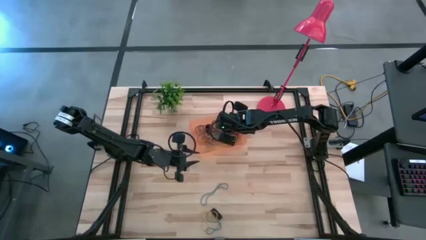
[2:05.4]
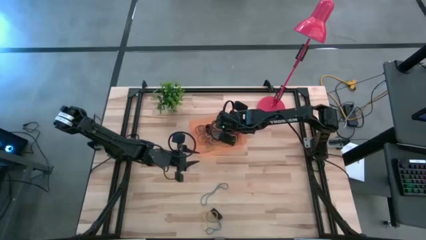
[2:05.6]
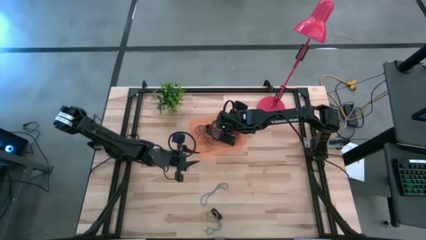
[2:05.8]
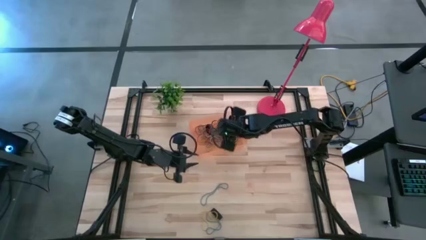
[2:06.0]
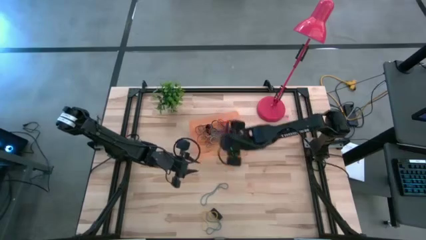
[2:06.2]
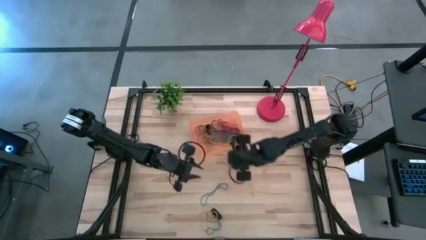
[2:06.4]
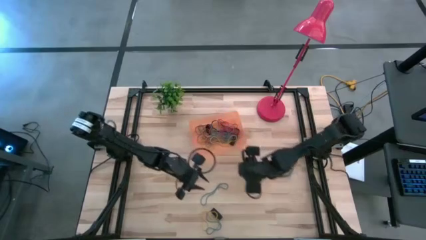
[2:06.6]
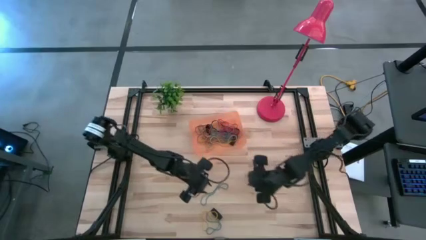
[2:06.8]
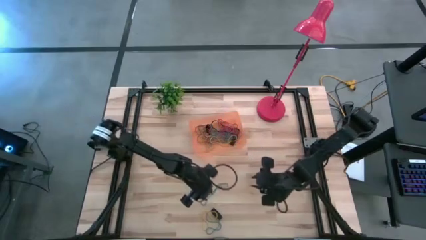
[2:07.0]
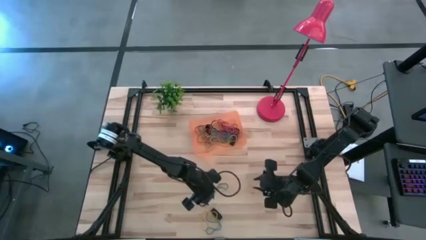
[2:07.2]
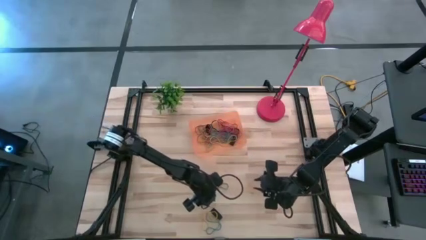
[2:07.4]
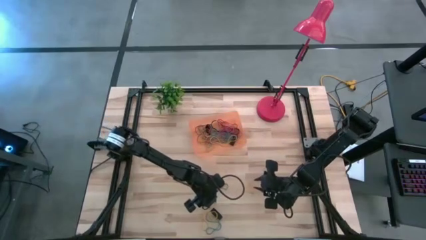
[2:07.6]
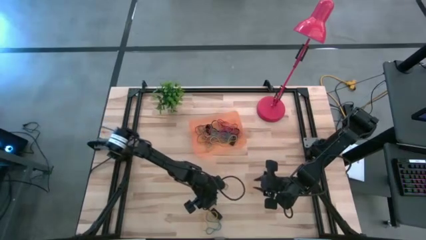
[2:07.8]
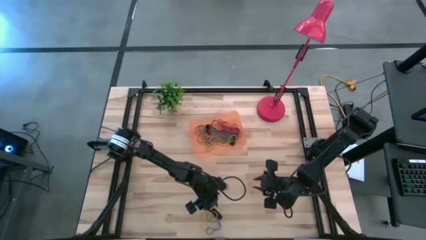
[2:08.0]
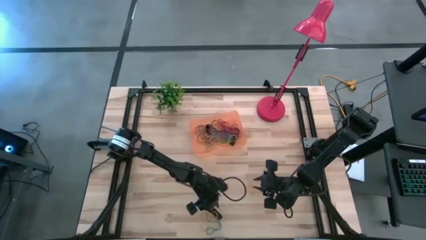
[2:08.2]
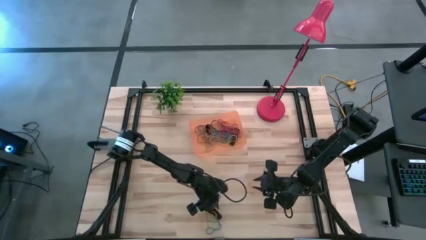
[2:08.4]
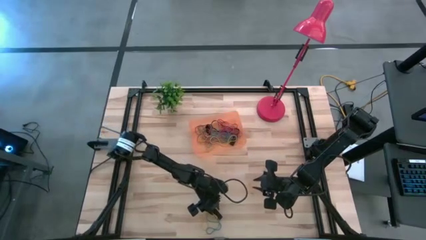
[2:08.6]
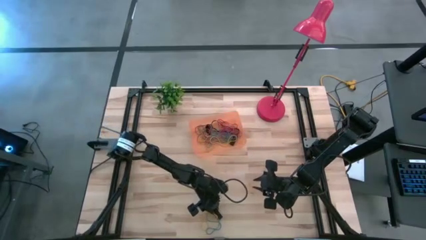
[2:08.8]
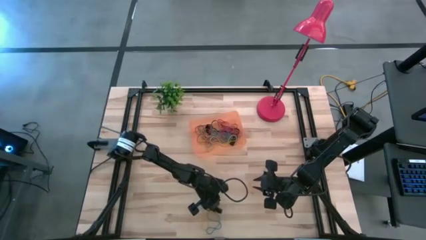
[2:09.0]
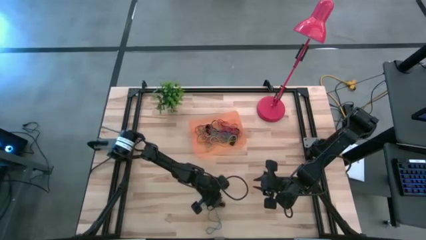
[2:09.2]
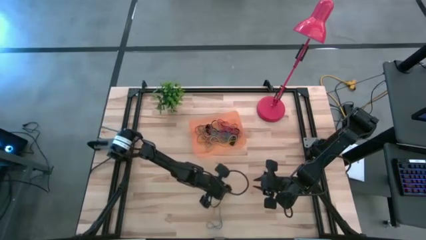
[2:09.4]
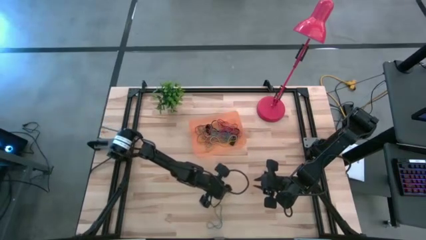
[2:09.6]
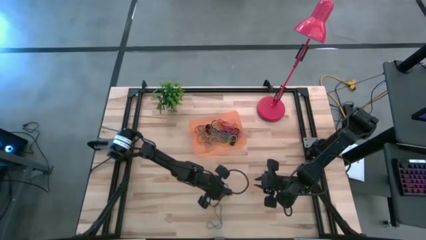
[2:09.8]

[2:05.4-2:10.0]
Task: Pick and place rubber bands into bin
Put the black rubber band into the orange bin

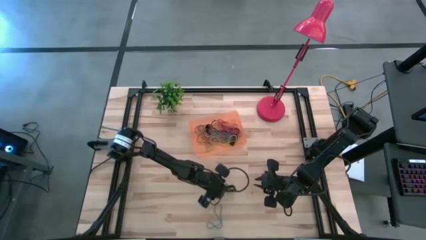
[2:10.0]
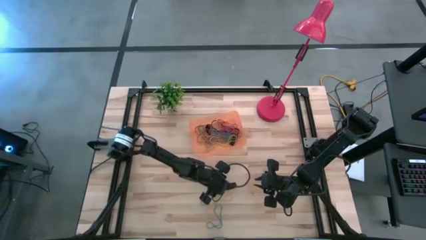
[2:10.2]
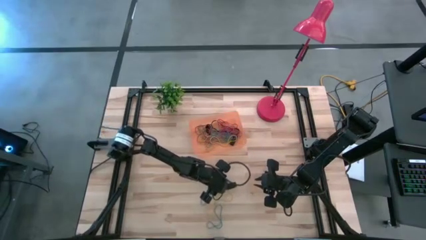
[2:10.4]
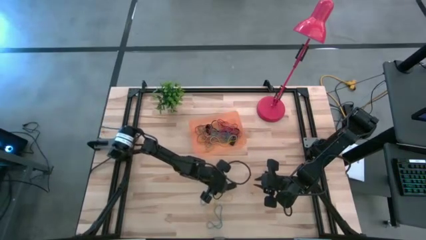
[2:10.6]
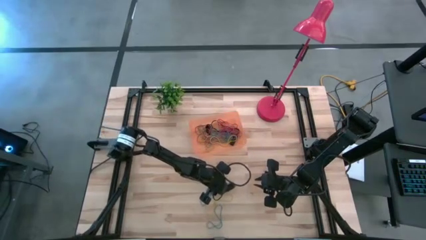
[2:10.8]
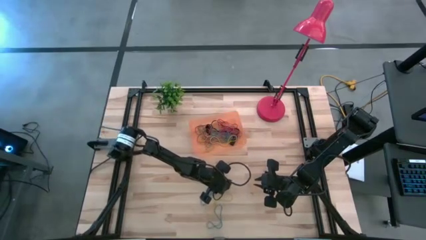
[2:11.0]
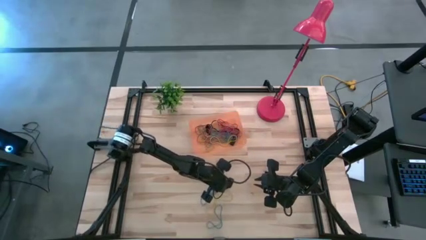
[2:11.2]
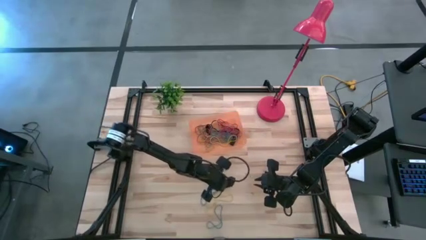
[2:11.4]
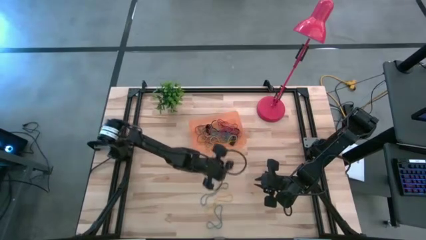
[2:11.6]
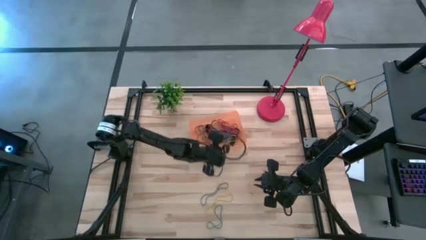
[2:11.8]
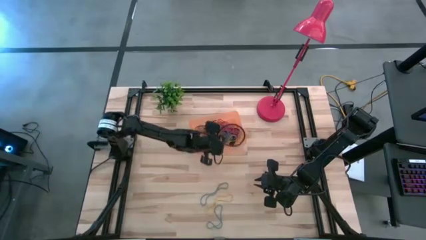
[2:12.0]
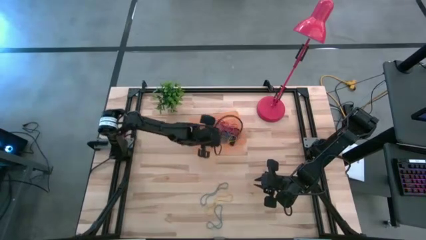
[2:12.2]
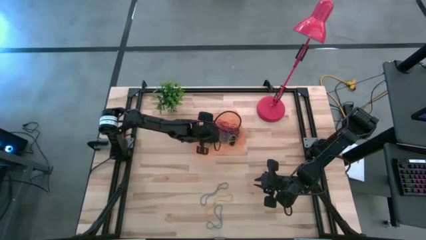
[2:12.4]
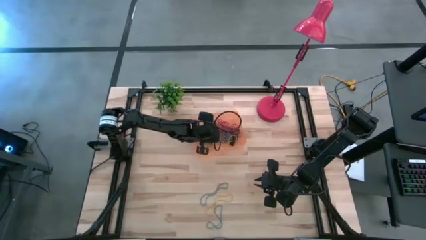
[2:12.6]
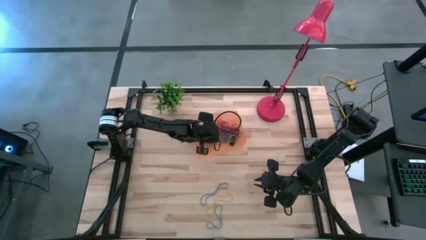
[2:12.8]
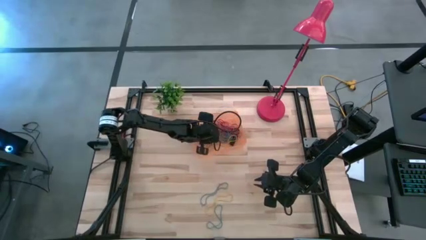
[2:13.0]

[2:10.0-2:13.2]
Put the black rubber band into the orange bin

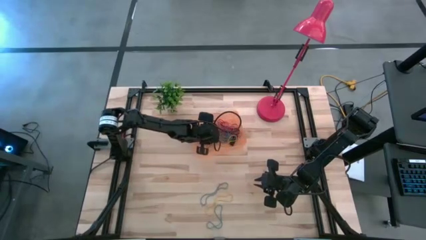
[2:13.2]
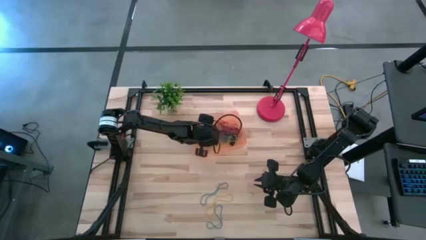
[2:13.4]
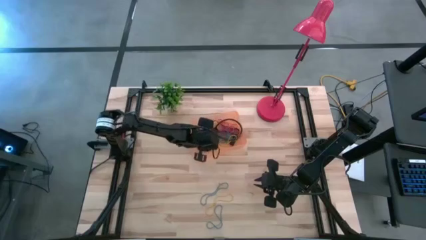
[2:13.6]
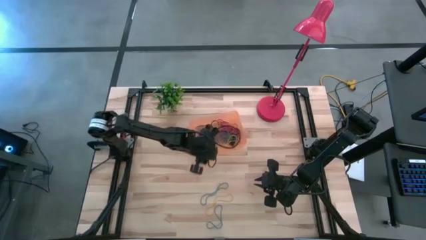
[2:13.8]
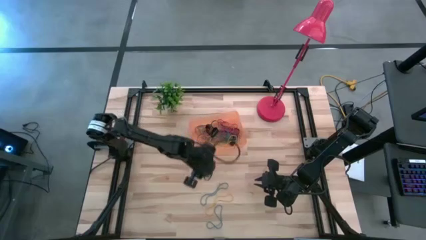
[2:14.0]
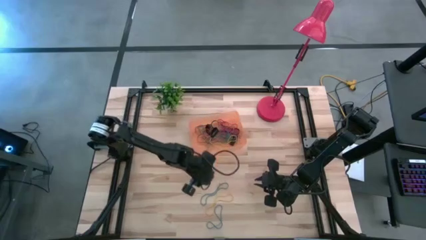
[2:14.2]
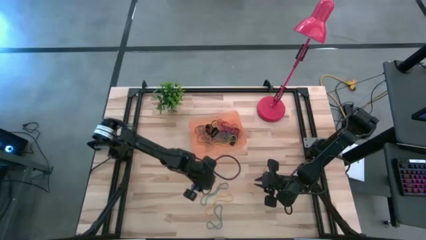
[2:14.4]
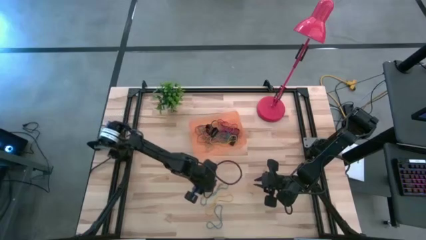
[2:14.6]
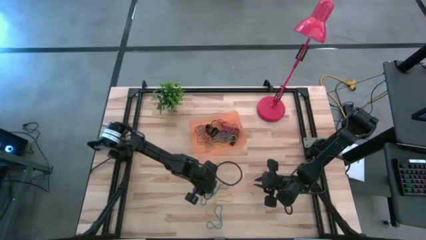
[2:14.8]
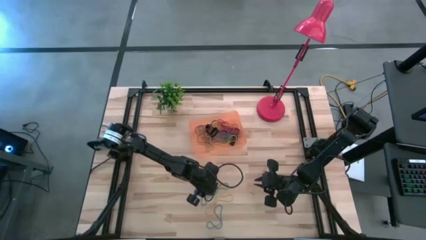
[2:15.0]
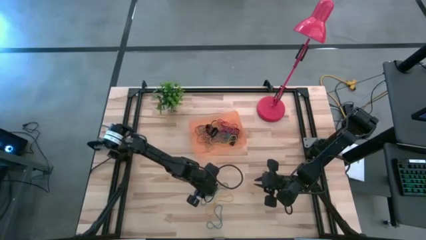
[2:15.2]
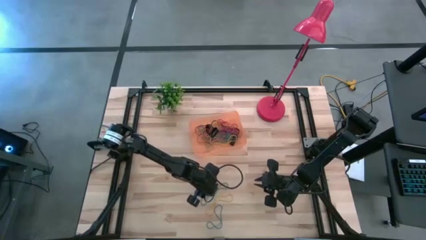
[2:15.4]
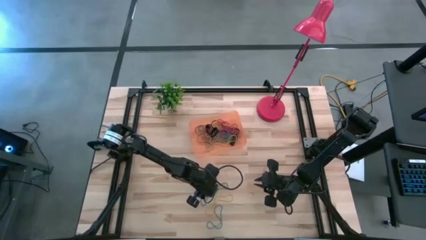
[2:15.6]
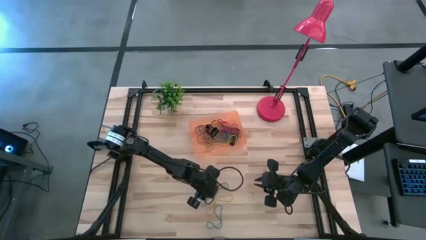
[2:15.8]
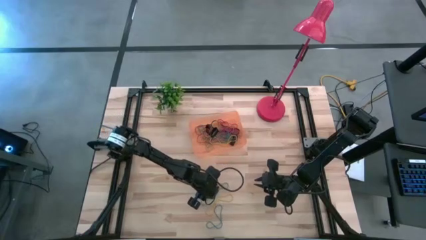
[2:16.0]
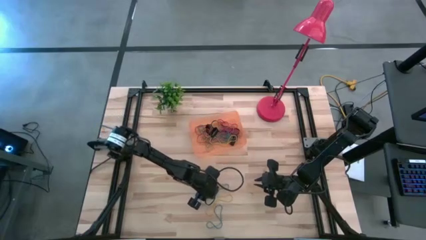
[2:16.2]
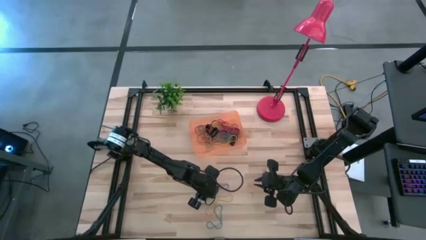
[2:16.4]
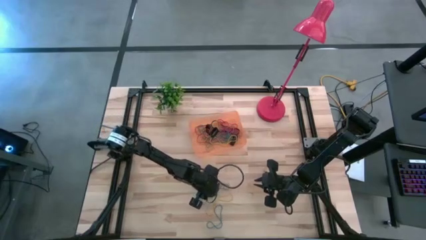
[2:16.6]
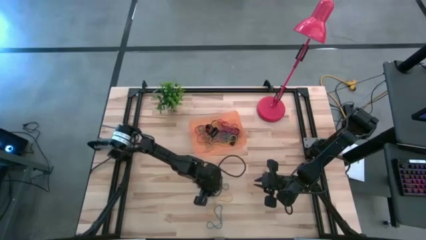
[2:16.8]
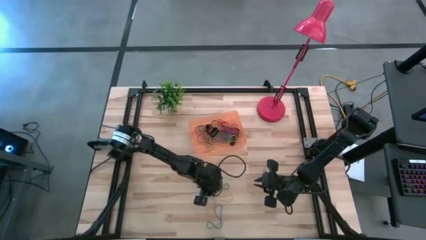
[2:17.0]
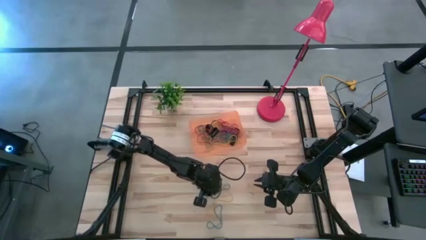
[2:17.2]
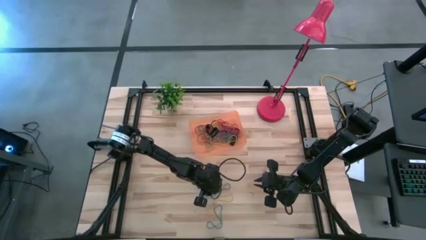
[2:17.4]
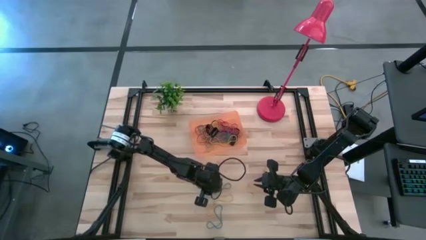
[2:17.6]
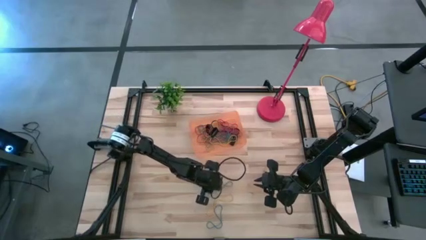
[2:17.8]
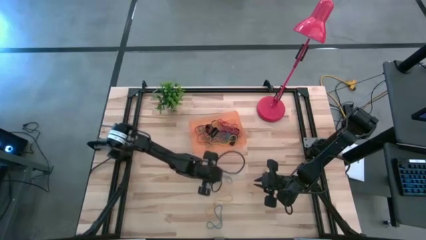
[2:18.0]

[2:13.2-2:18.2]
Put the blue rubber band into the orange bin

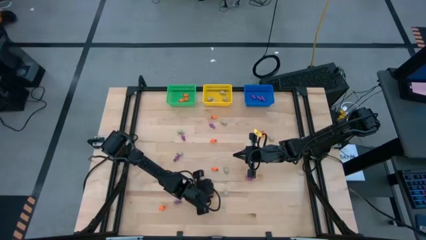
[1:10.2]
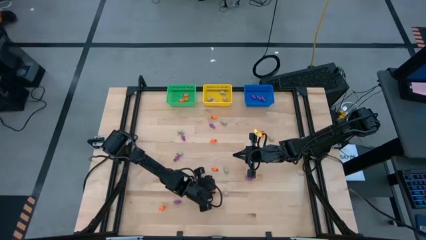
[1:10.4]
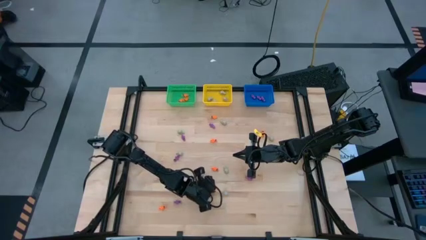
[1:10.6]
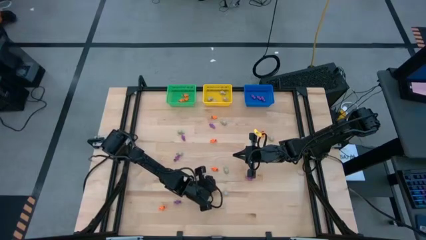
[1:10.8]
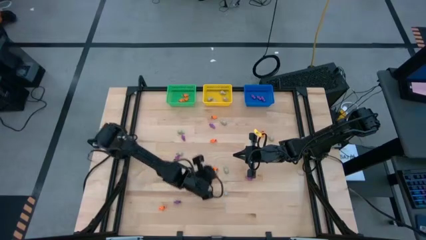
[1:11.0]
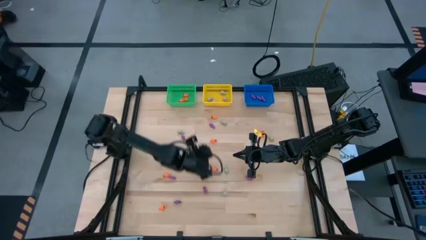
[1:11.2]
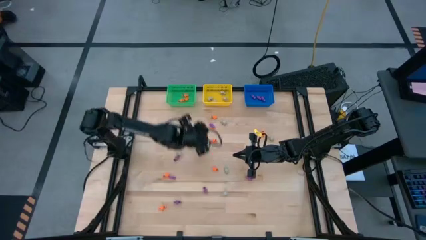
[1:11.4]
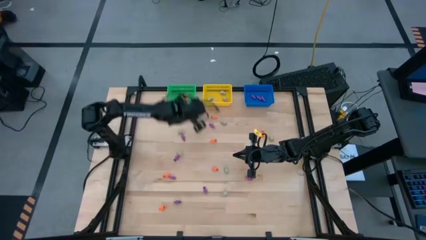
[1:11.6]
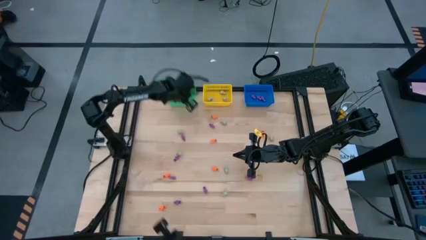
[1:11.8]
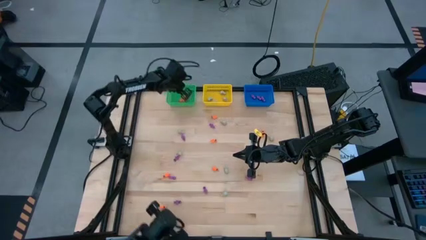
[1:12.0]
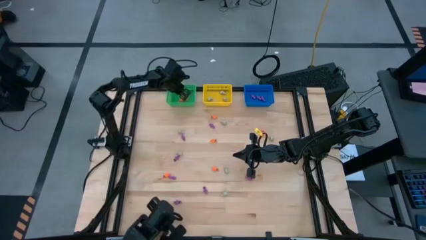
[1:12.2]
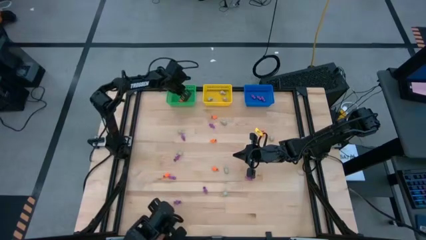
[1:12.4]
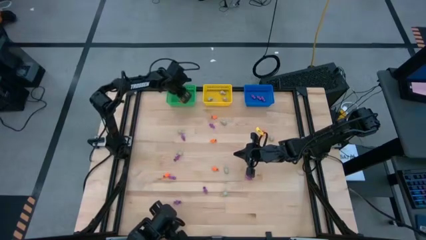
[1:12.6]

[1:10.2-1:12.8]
Task: Sort Halloween decoration
Put the orange skeleton toy into the green bin
